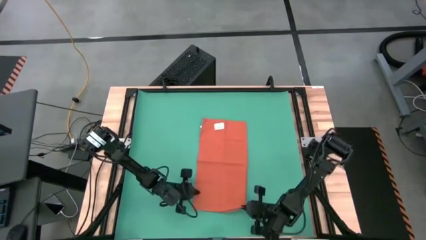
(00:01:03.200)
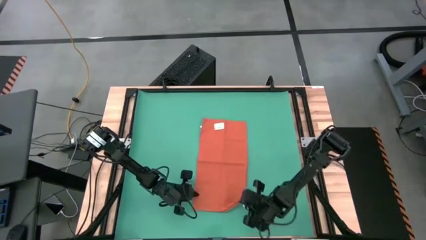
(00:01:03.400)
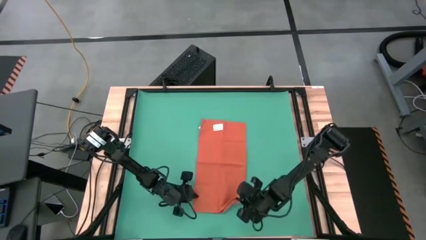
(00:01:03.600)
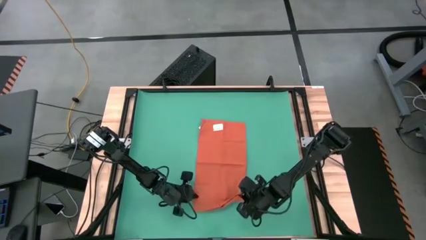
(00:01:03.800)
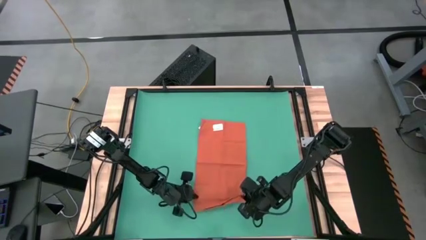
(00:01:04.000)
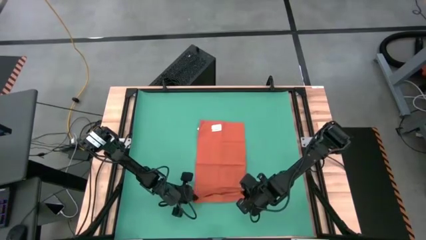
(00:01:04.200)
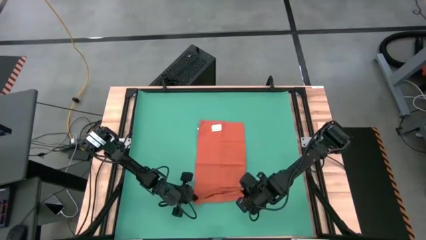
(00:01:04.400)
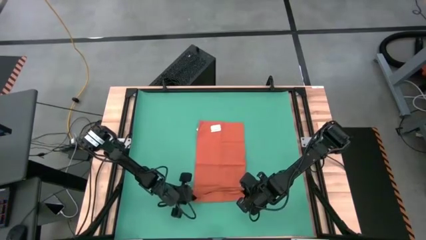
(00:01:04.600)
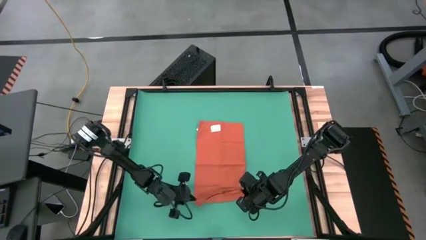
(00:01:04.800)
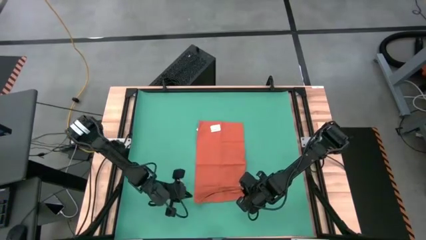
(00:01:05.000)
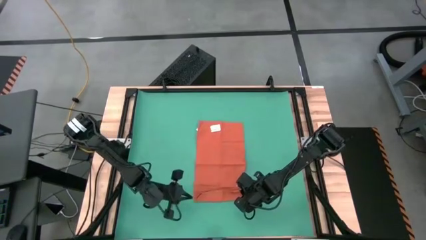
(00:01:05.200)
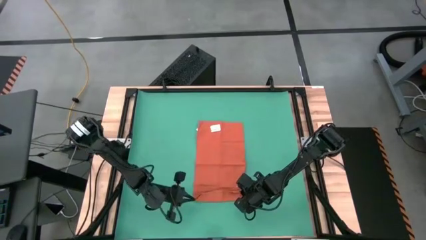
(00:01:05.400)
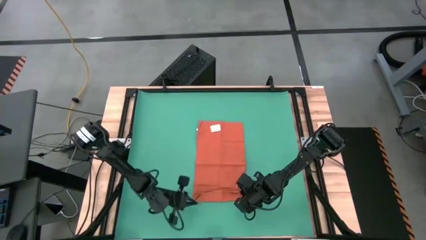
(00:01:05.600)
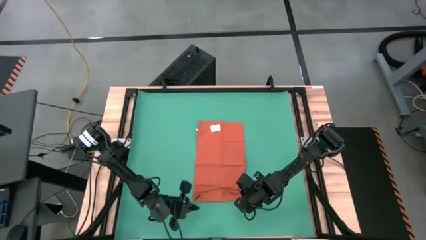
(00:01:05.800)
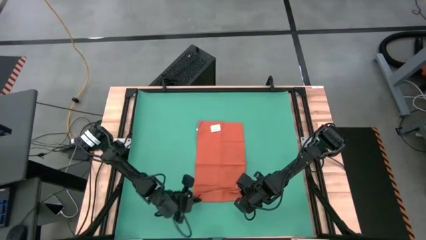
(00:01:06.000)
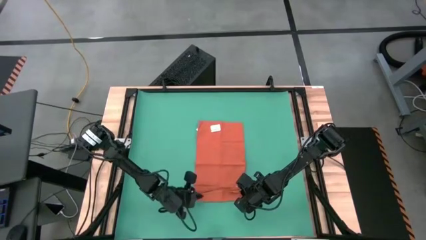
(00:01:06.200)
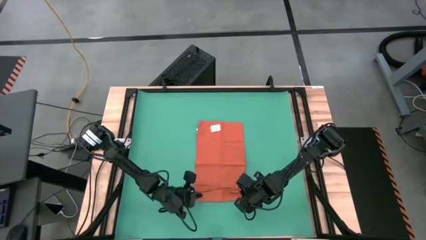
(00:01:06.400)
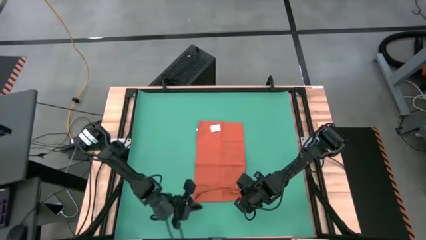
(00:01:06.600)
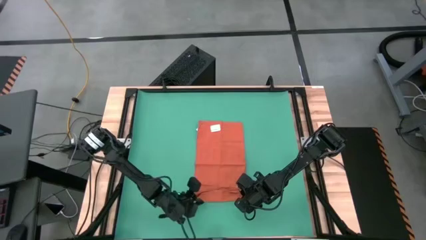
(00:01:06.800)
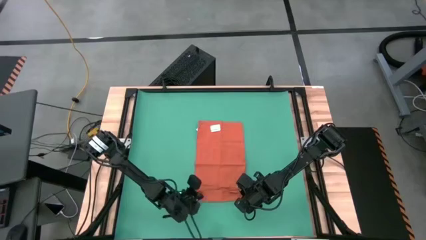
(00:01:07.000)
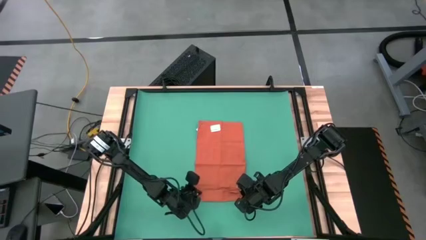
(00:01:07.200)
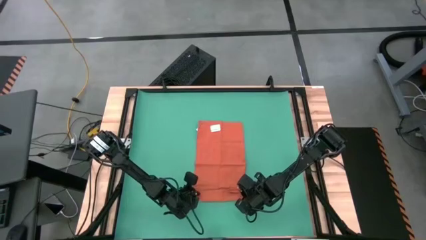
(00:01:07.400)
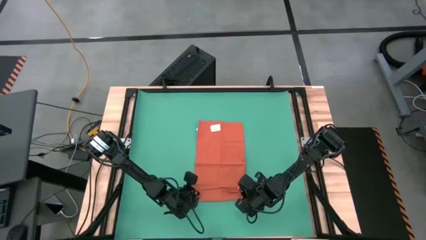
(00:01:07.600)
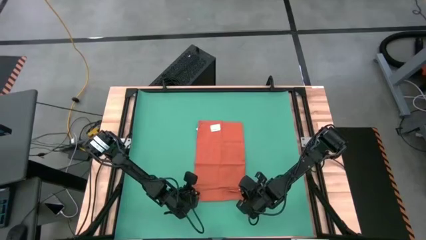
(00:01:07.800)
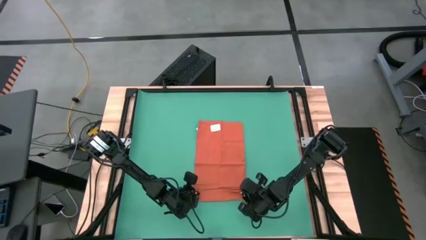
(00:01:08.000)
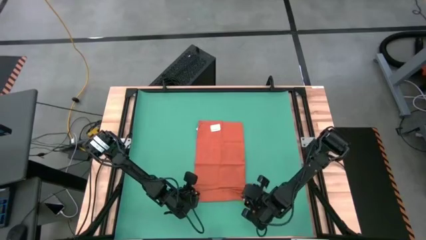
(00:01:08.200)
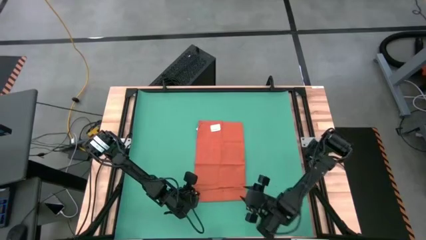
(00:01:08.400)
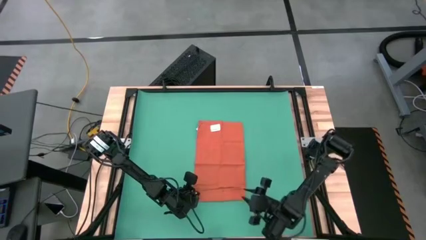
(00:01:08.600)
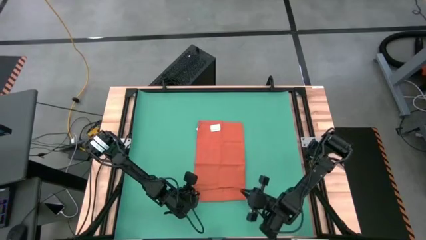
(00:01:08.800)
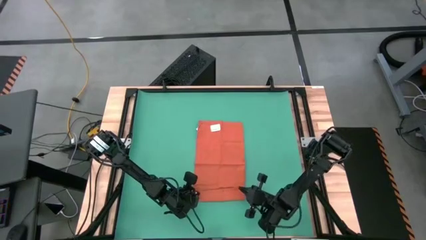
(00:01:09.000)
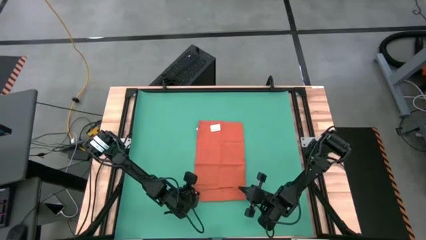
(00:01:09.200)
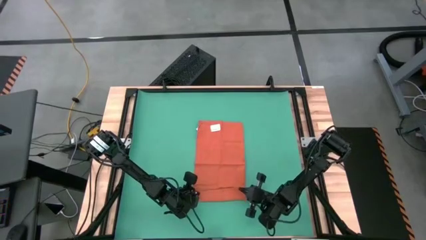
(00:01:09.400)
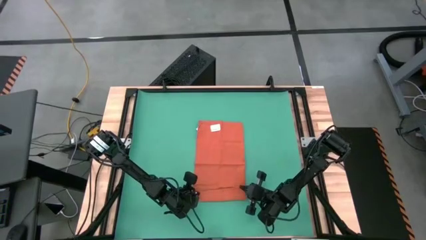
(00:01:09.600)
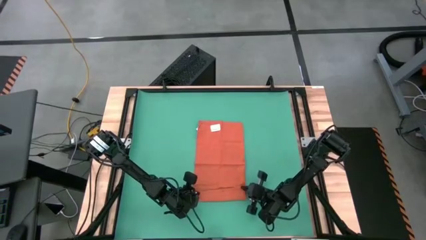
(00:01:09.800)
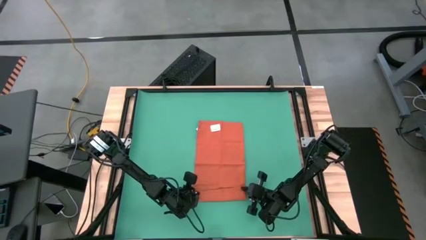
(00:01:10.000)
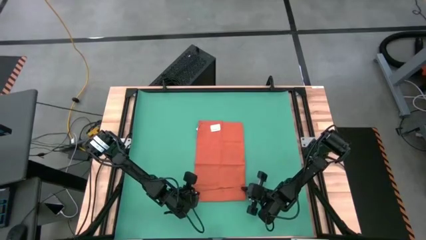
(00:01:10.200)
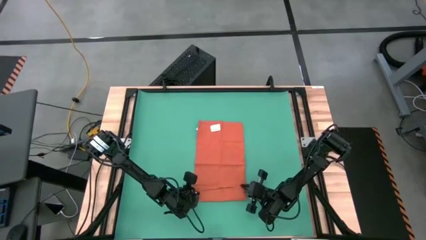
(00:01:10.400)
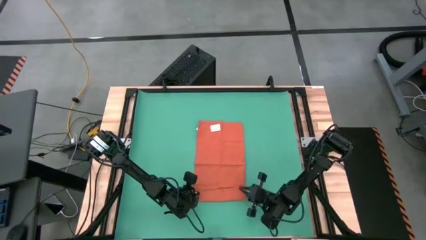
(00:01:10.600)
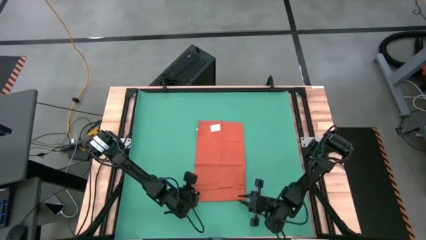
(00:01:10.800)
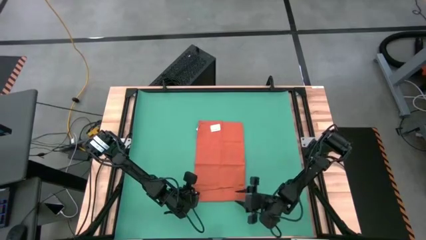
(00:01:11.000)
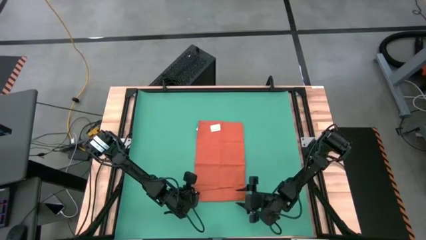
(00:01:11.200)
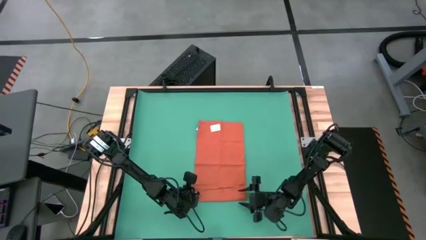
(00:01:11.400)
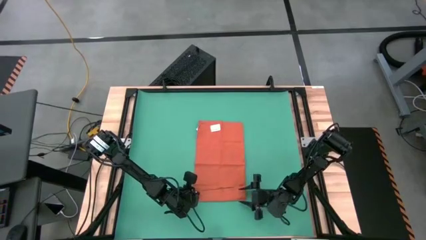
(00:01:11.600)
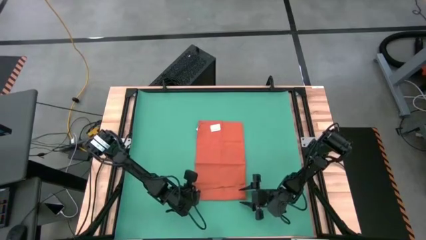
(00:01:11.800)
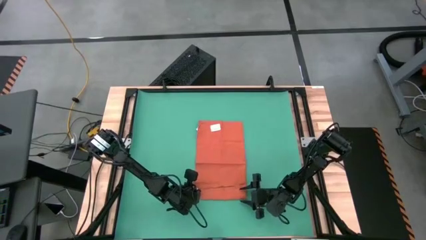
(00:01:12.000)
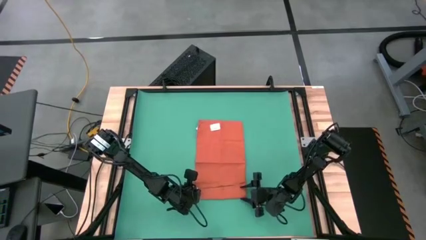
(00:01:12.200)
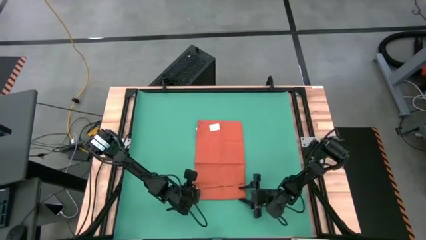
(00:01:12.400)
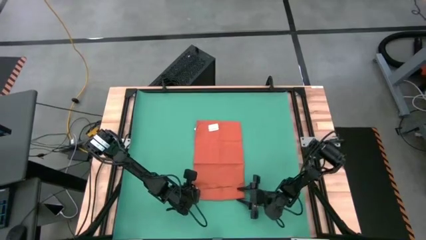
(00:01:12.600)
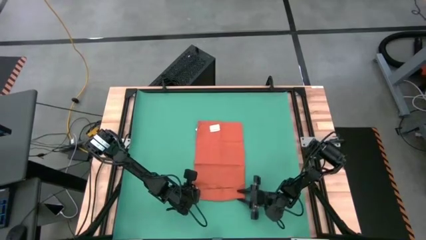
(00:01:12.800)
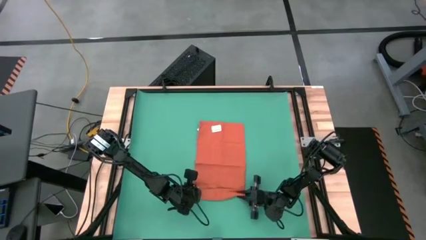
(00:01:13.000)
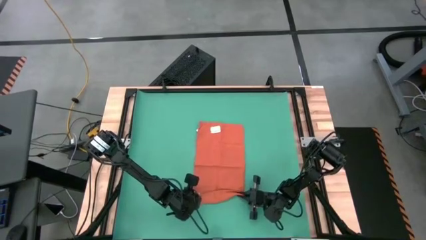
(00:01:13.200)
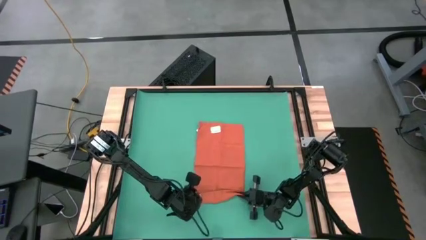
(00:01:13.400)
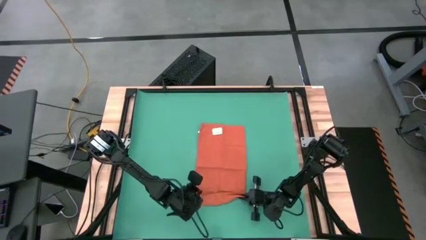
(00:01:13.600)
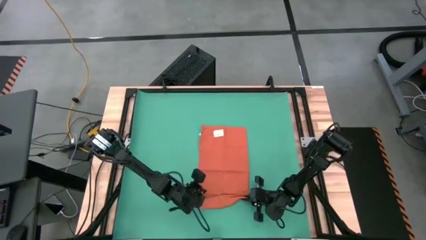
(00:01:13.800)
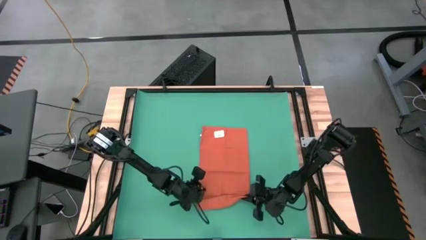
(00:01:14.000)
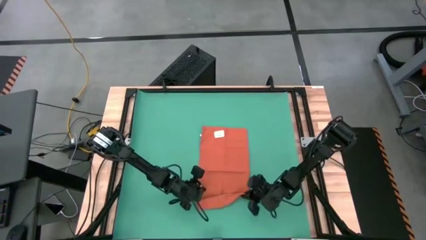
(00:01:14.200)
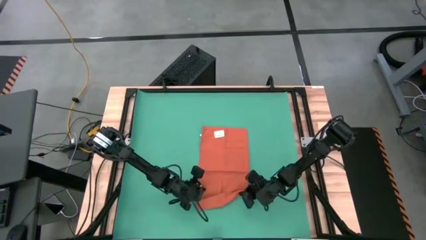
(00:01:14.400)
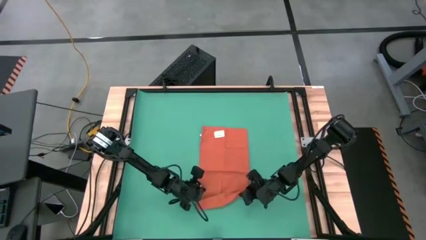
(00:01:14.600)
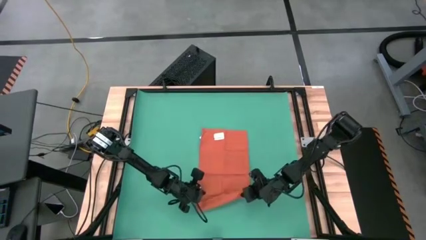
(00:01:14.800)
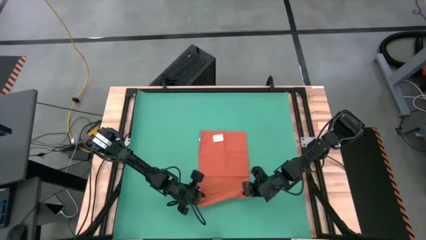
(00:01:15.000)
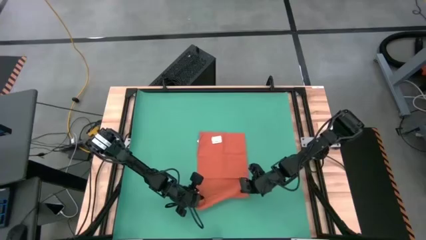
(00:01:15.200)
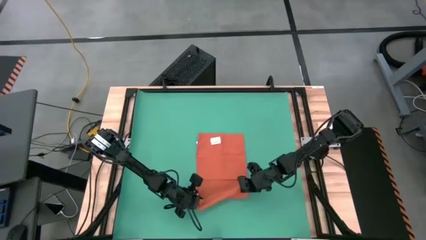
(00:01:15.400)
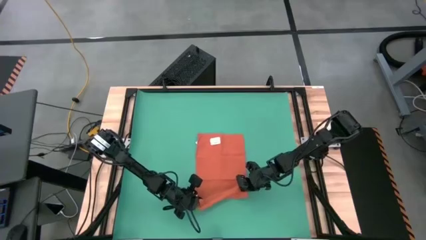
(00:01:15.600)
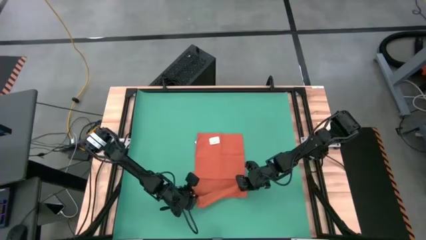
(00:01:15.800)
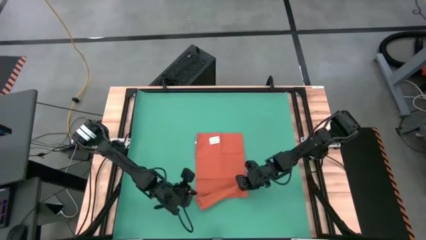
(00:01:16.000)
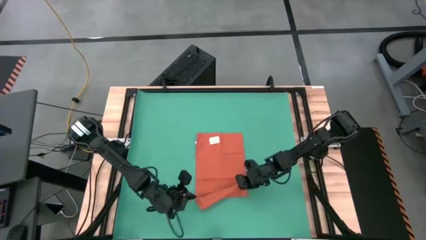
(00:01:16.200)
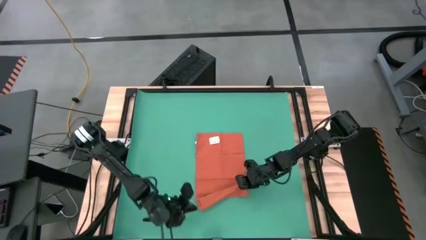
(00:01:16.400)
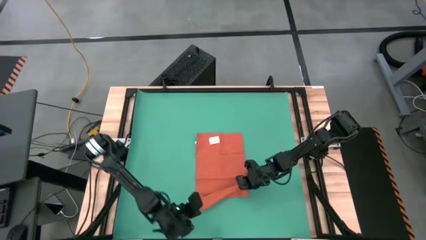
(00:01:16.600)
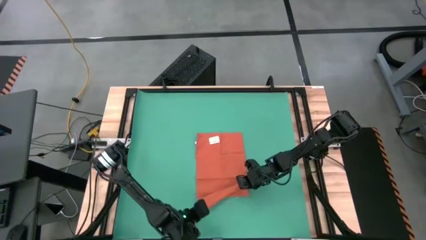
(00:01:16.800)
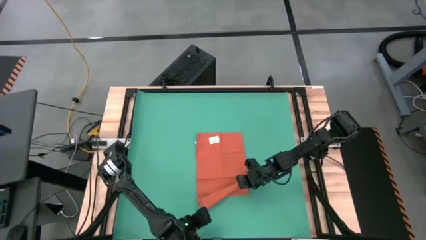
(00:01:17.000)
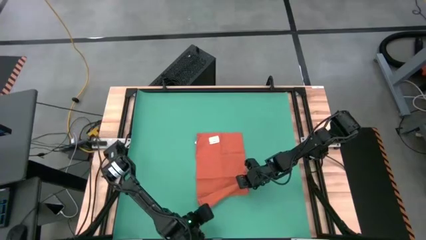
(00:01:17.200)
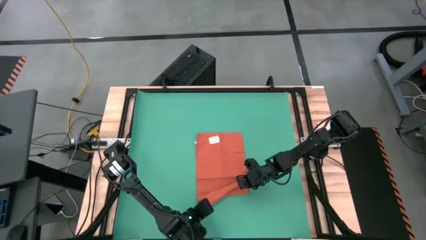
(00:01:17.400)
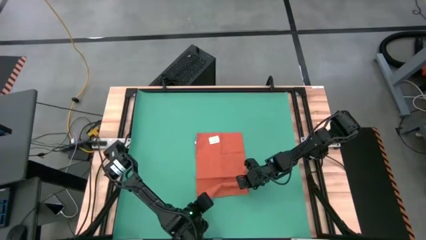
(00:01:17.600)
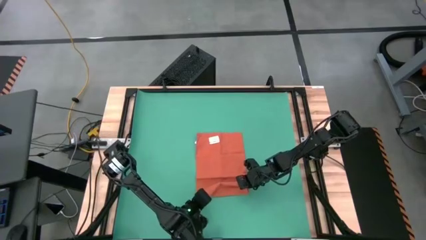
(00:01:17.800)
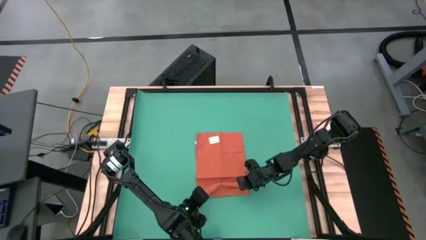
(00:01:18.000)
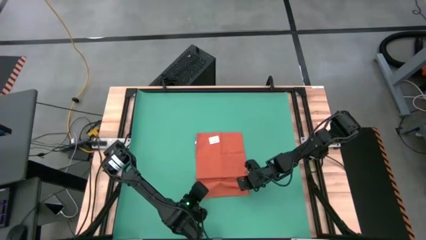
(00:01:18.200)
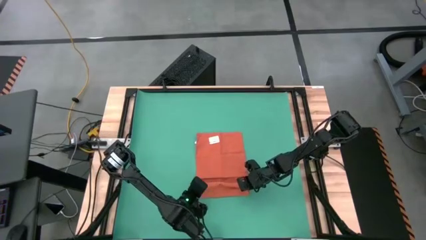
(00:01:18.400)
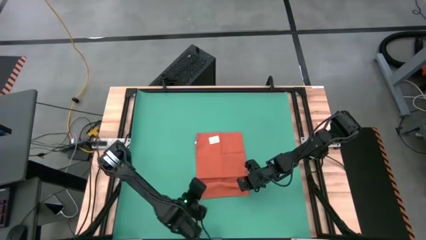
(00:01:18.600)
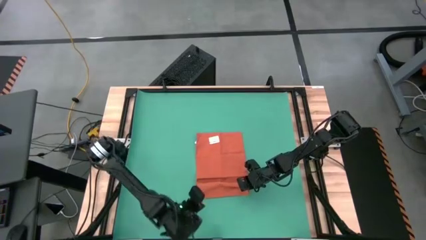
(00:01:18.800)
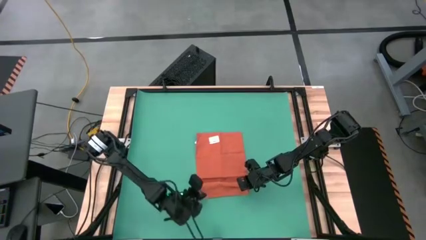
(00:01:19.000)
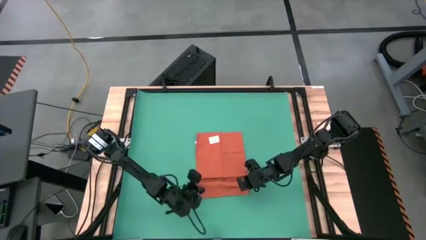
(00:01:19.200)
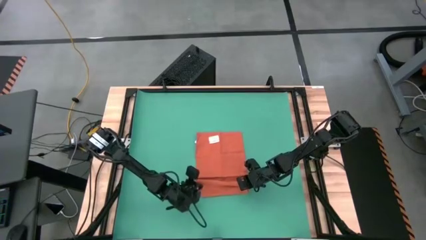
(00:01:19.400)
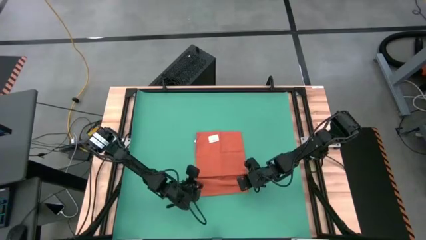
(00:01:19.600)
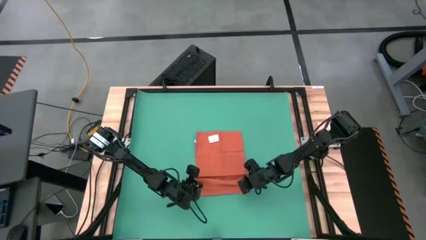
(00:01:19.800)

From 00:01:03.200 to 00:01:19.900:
Task: Roll towel into tight, uniform cylinder
Roll the orange table napkin
